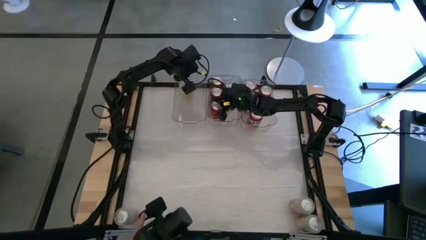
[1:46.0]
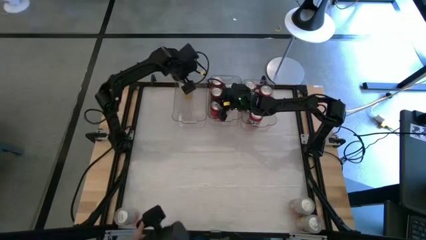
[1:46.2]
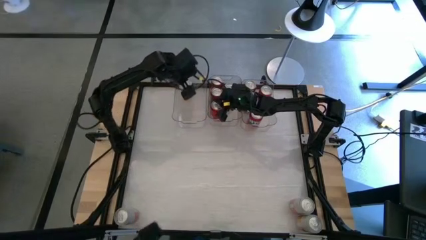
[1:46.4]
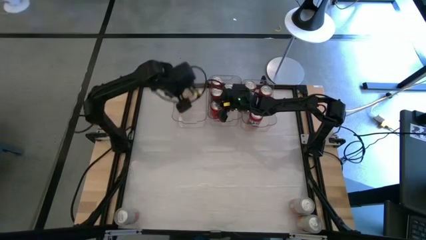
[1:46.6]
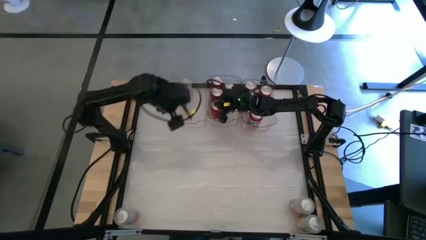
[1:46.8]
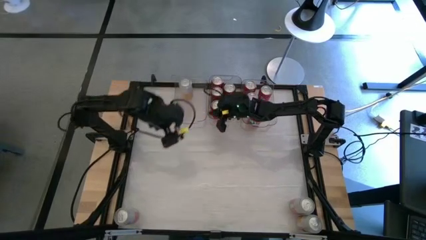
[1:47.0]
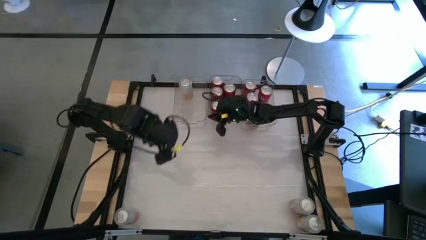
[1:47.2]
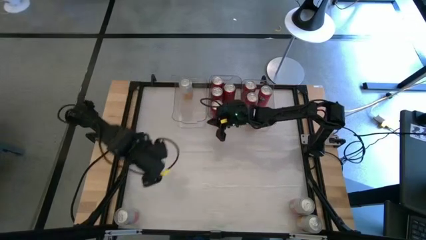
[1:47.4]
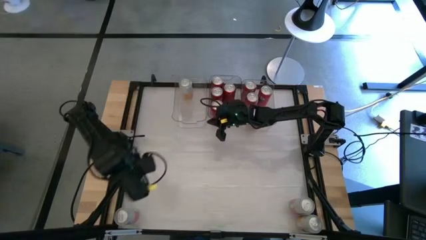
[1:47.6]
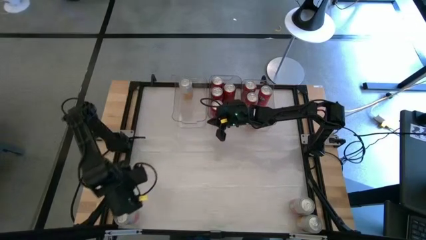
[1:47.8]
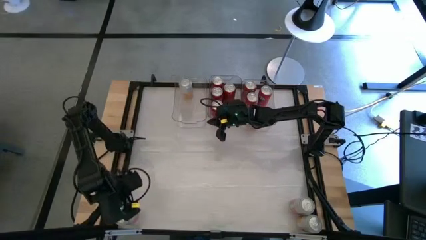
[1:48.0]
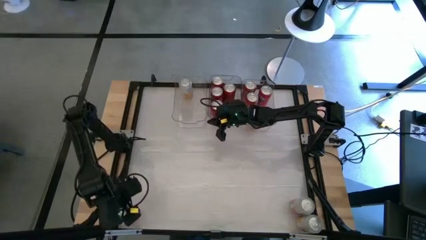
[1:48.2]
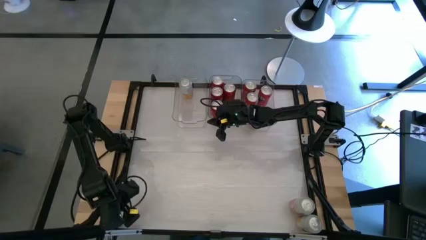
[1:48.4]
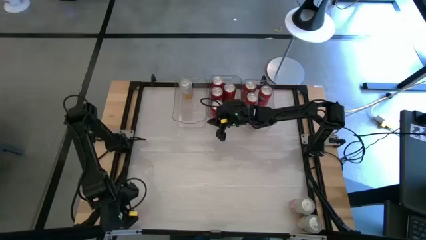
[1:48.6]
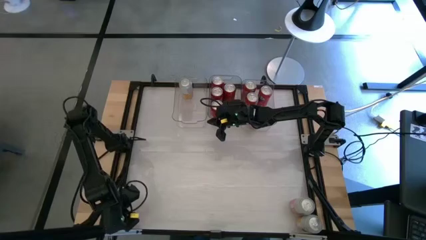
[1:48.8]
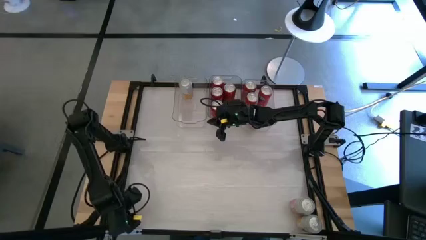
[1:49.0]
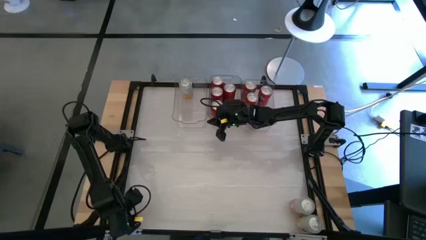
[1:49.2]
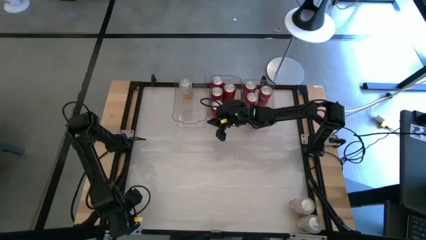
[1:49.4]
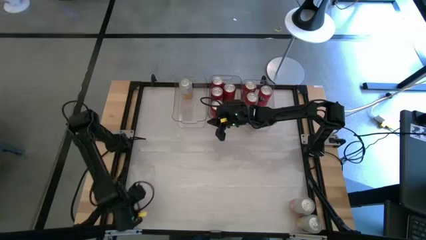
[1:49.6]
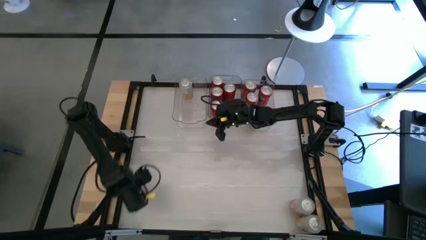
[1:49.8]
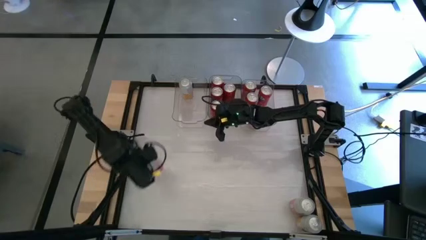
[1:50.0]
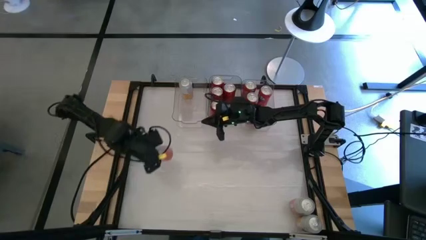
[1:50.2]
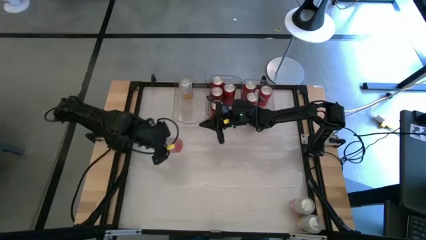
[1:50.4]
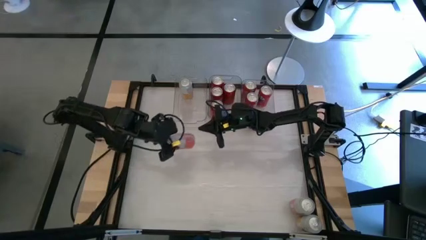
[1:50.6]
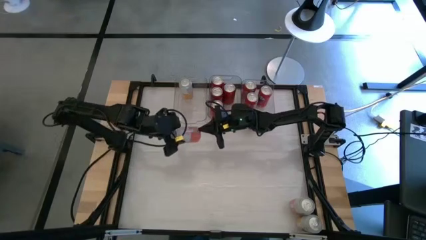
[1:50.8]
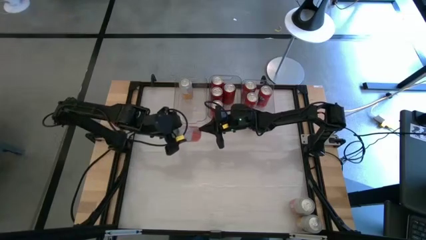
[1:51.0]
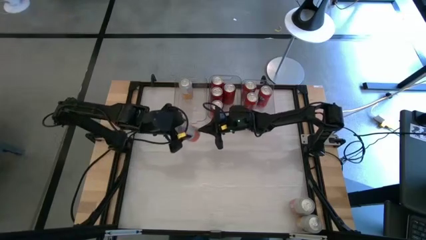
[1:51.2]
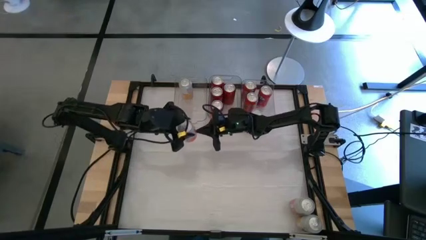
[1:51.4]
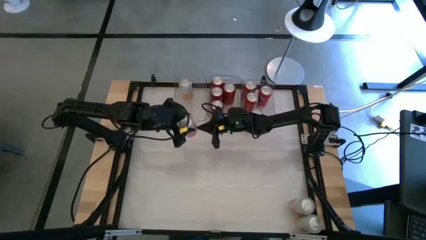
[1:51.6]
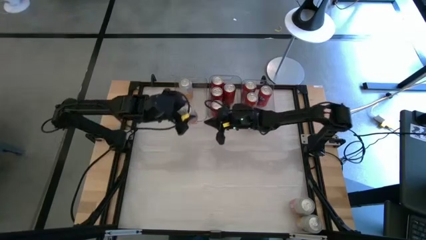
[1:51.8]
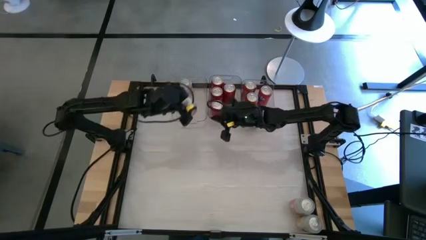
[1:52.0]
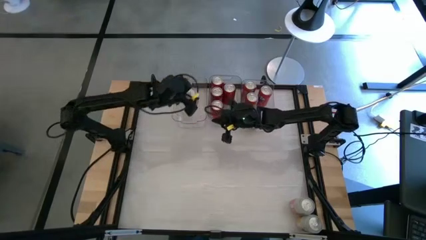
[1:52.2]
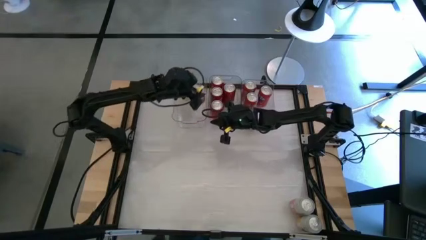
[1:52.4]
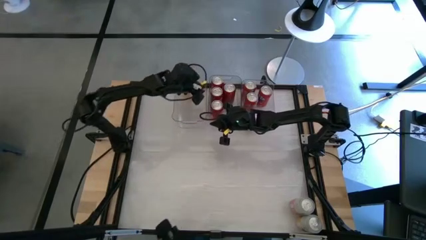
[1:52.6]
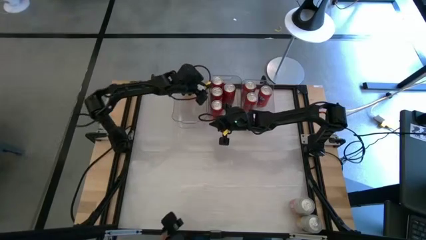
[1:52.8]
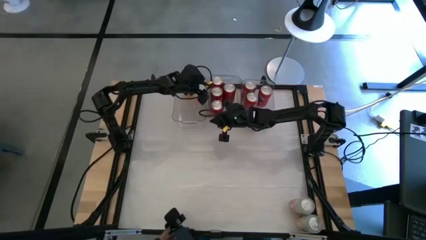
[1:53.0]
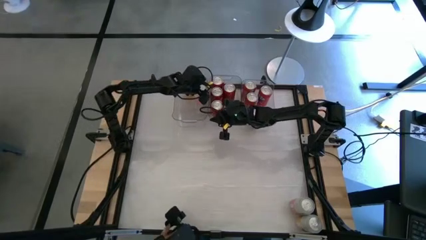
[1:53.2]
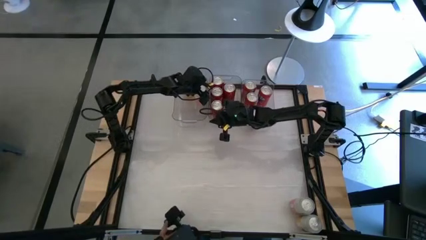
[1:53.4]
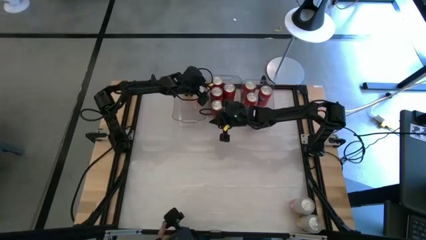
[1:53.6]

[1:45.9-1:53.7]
Task: Sort soda cans
Put the bottom left yellow-white soda can into the left transparent bin

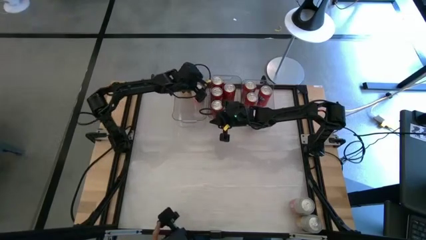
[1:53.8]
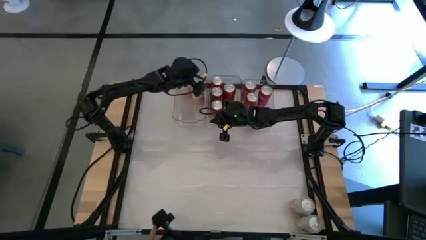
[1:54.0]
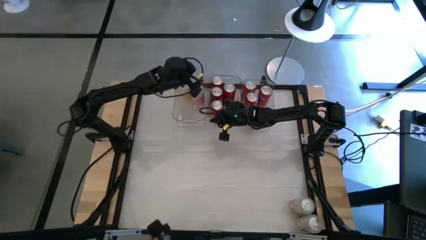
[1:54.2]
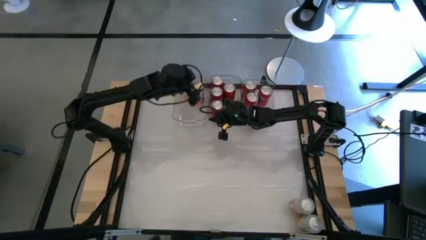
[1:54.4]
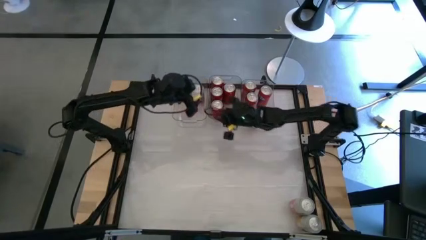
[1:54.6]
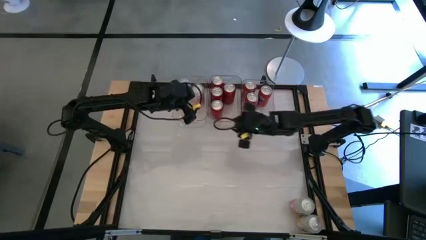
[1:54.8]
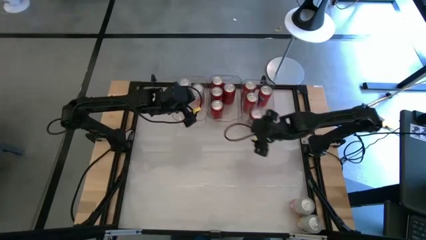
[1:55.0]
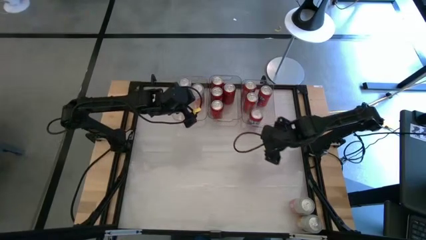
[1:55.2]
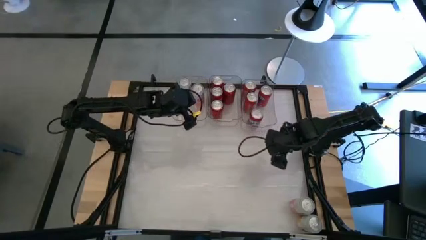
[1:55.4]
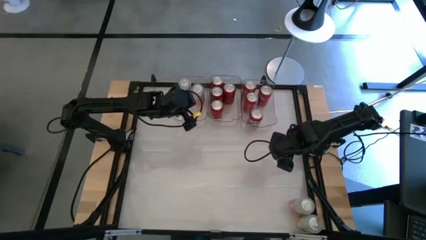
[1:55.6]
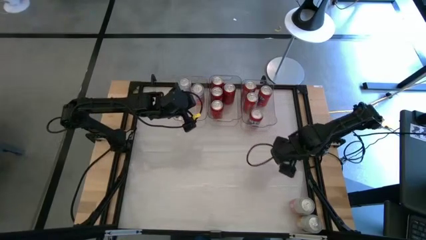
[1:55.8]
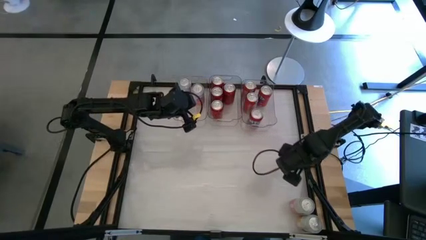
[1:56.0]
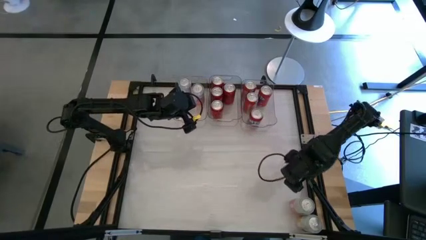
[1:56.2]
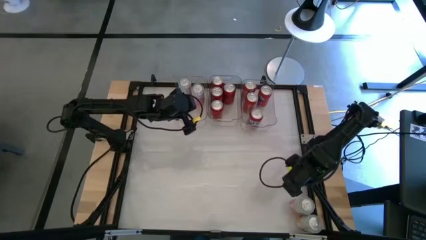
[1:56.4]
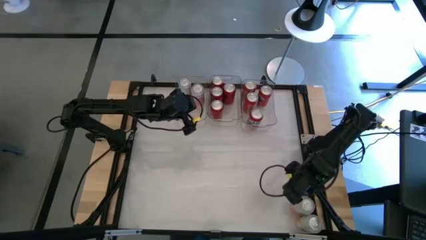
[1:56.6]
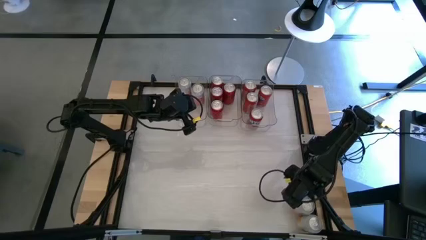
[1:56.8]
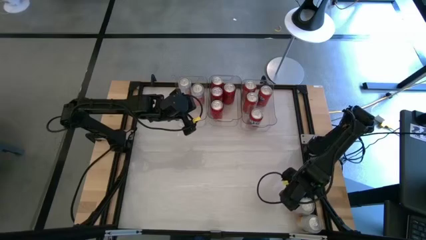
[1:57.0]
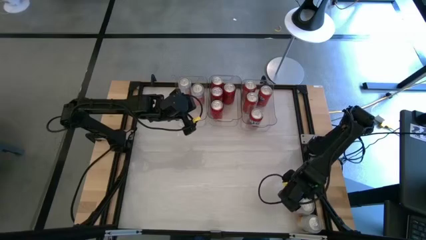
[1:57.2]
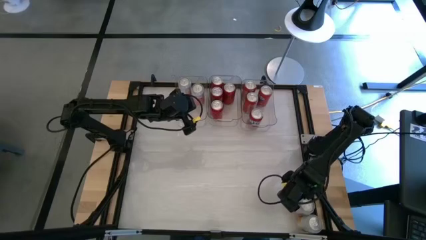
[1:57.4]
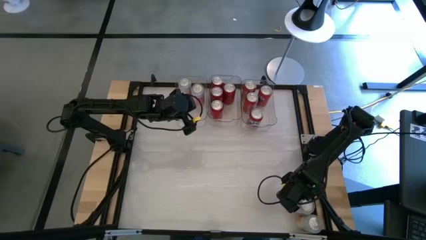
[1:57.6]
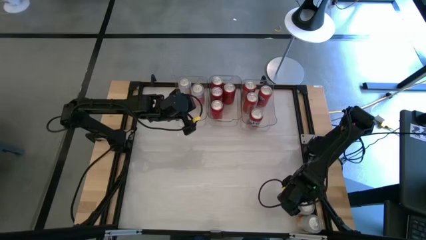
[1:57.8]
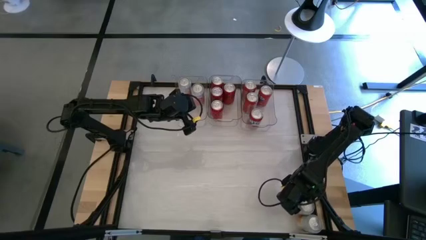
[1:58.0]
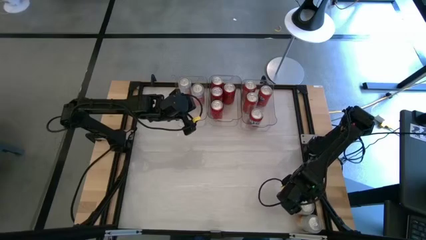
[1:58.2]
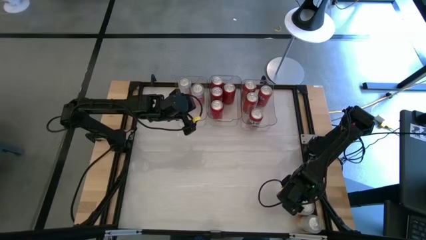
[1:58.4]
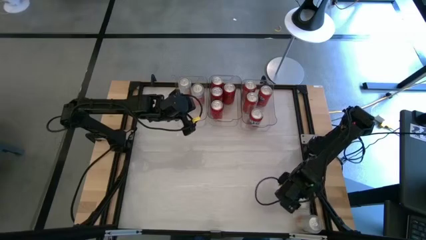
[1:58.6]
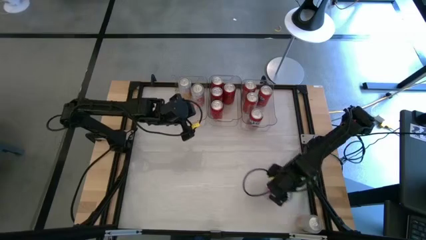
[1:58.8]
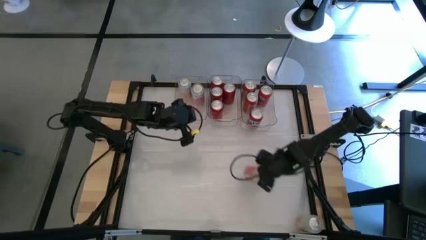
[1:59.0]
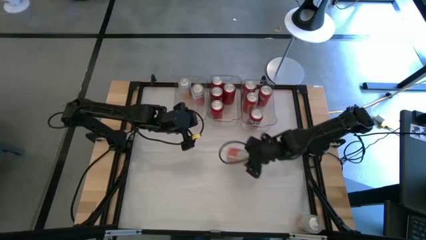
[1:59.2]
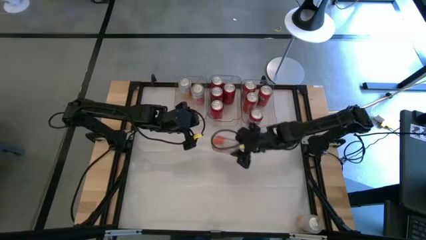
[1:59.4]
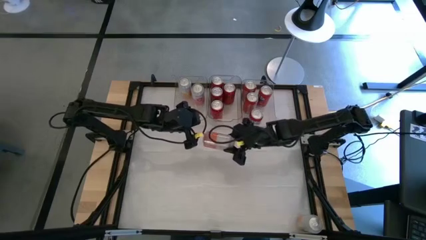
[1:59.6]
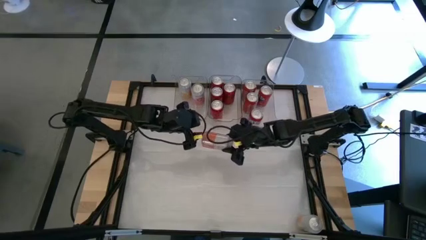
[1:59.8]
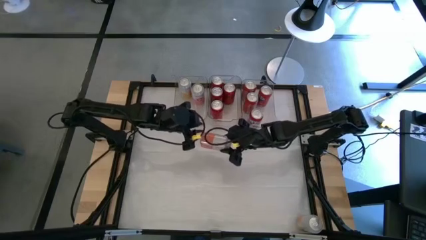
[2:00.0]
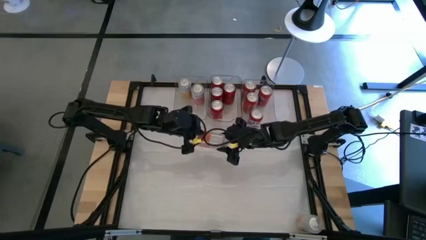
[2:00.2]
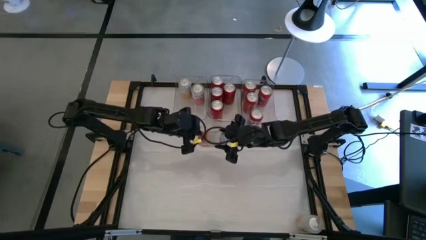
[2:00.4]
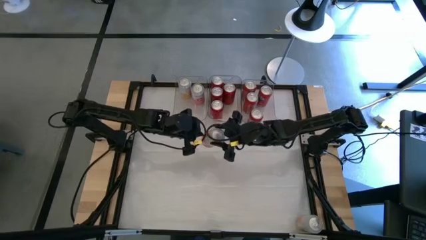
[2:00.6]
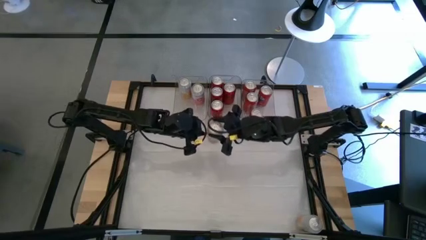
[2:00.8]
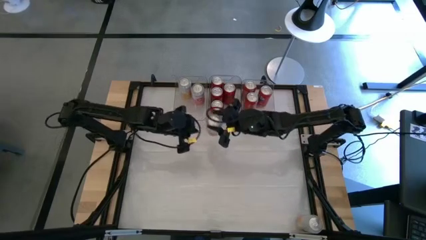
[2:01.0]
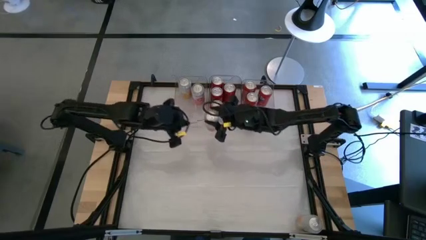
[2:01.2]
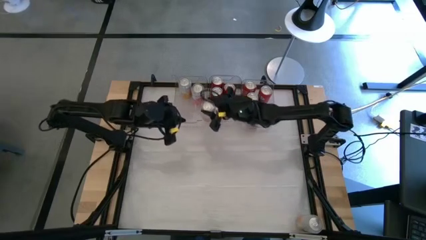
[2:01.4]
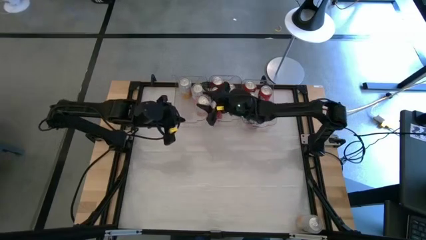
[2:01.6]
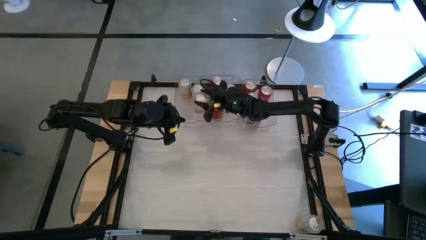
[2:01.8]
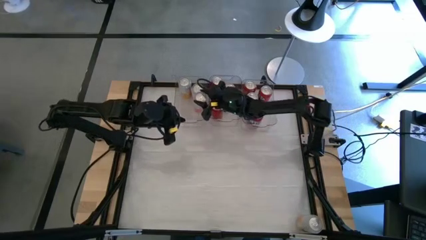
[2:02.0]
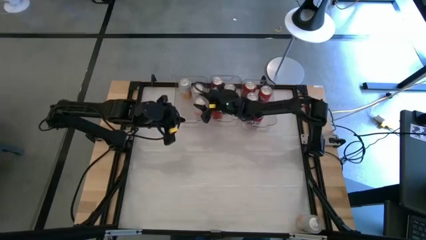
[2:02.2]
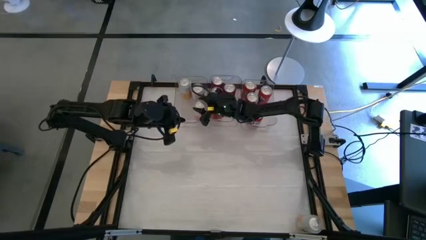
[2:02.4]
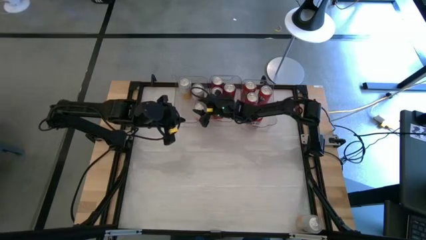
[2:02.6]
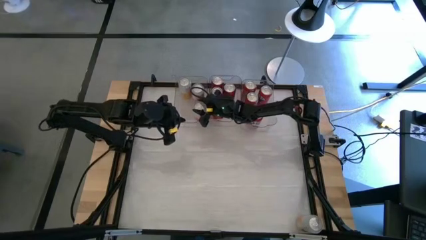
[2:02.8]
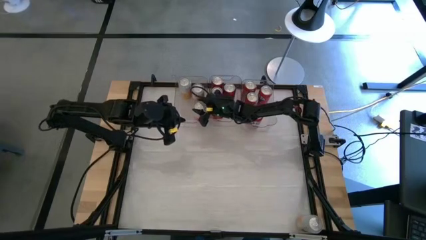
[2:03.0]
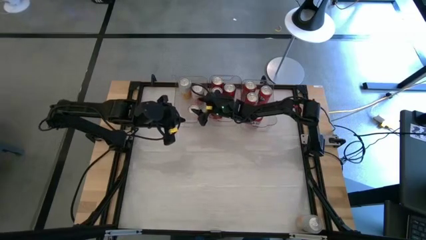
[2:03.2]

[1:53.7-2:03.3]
Put the top yellow-white soda can into the left transparent bin
